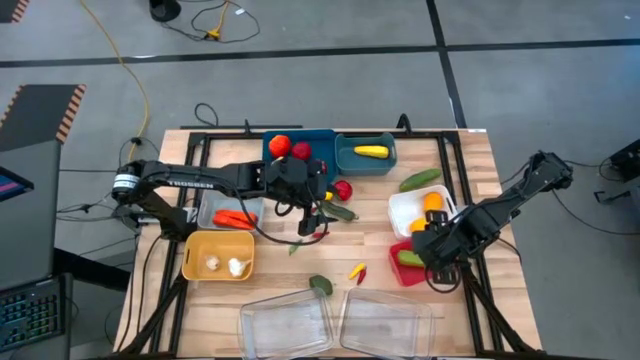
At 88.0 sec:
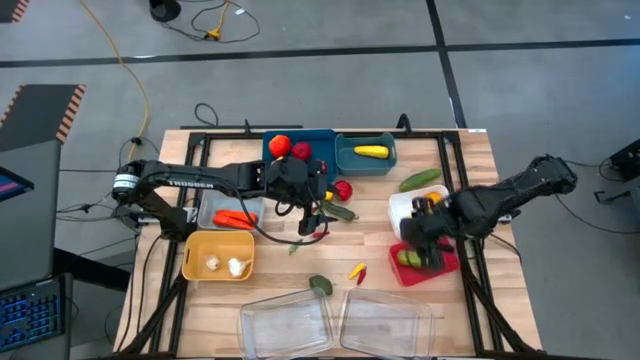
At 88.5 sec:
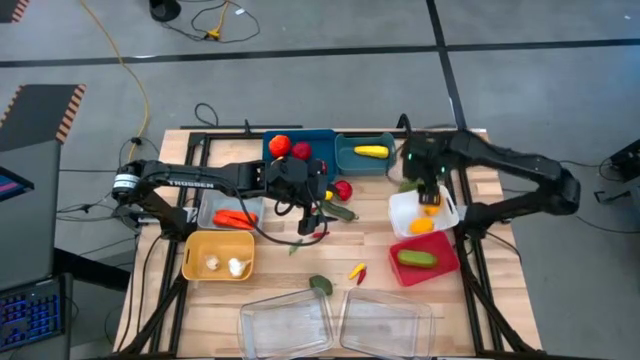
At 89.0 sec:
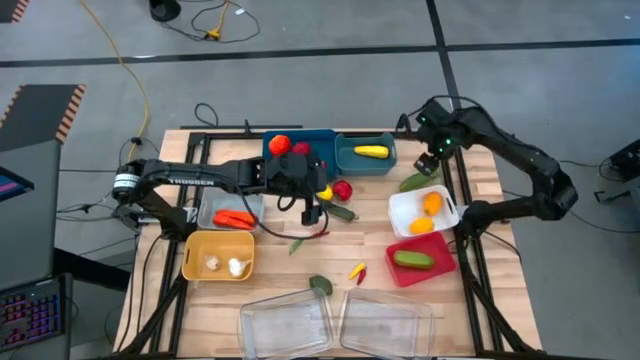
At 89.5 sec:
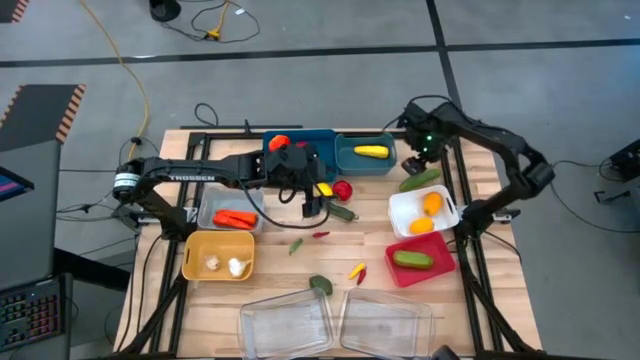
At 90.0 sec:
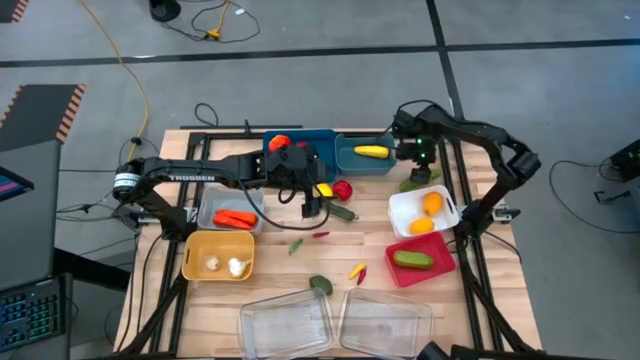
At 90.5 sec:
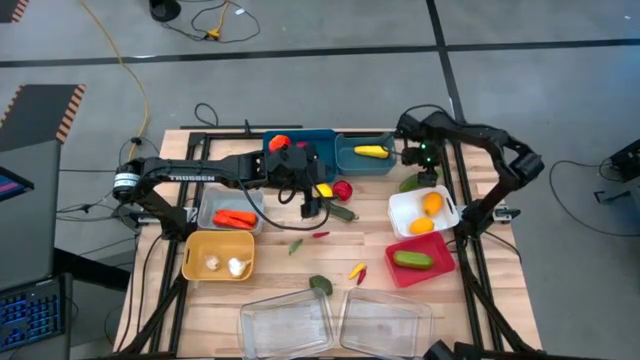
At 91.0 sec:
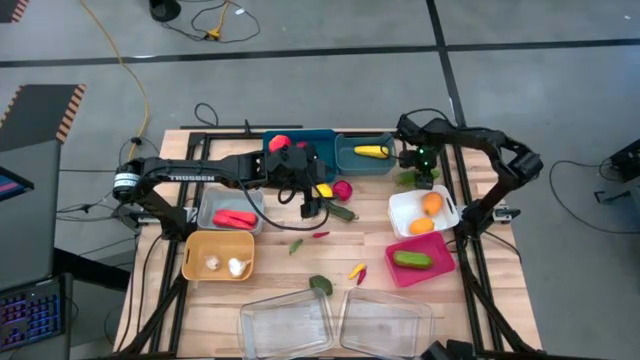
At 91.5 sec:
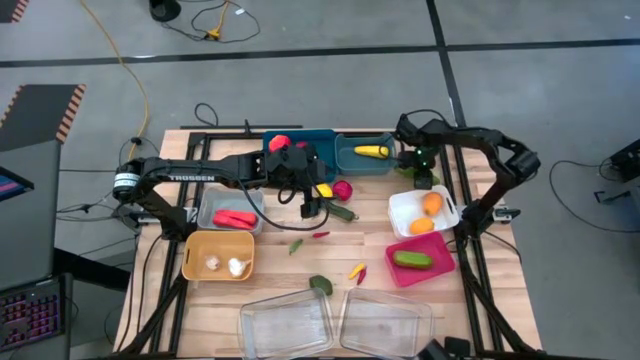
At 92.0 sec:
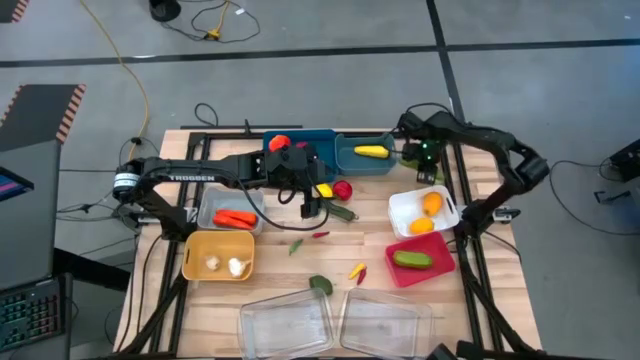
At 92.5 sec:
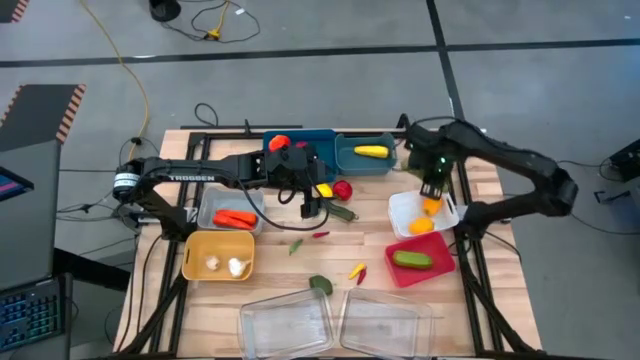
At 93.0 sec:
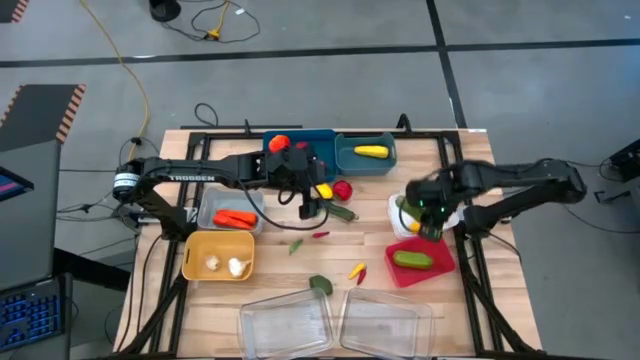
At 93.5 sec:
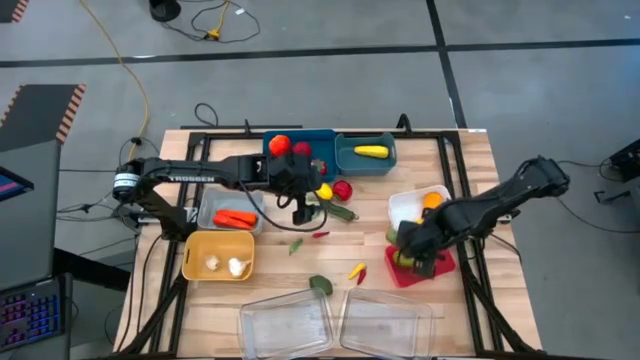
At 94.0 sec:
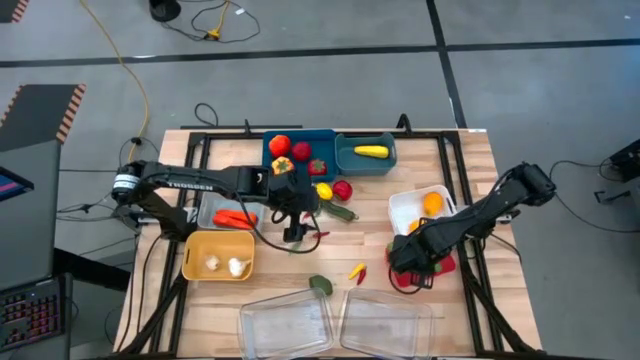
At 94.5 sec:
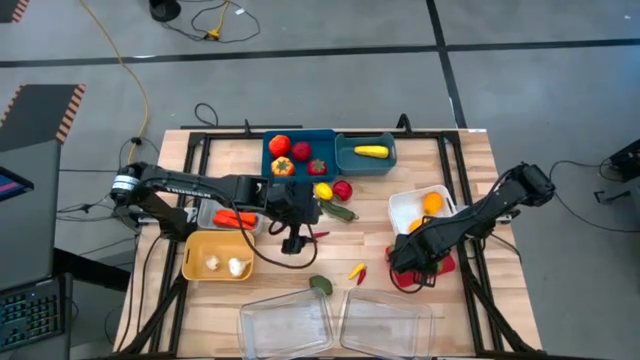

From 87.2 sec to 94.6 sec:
Task: Sort produce into baskets
Put the chayote into the pink bin

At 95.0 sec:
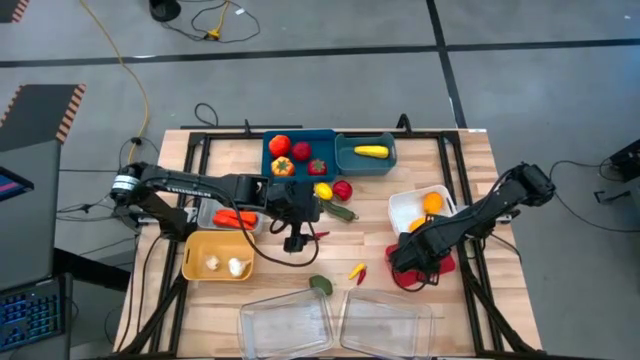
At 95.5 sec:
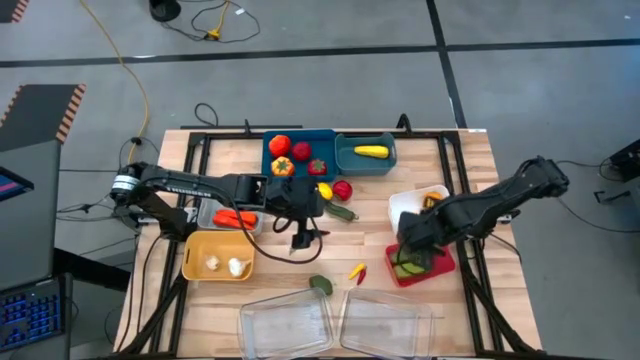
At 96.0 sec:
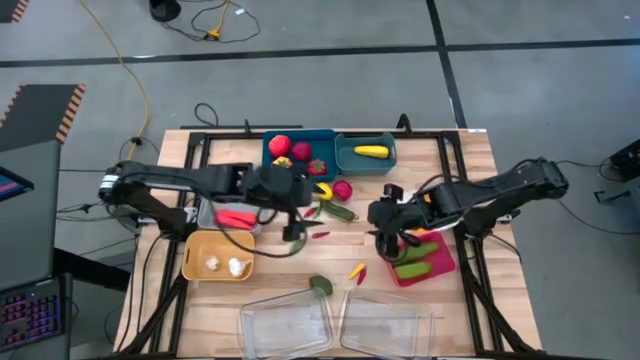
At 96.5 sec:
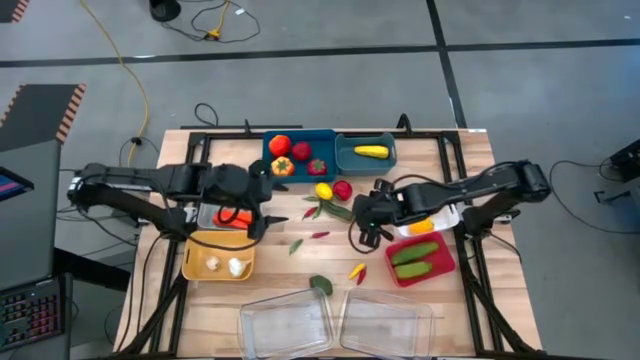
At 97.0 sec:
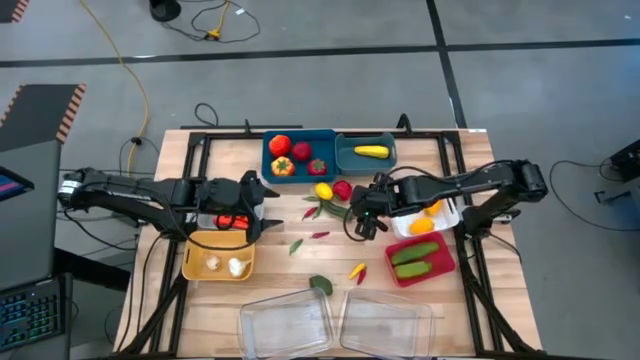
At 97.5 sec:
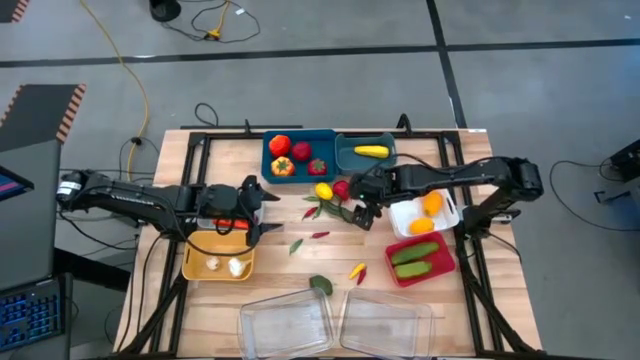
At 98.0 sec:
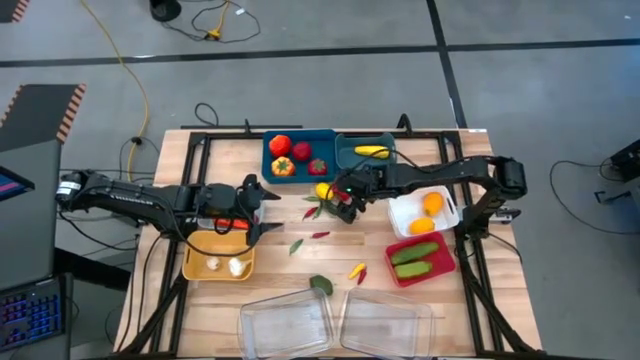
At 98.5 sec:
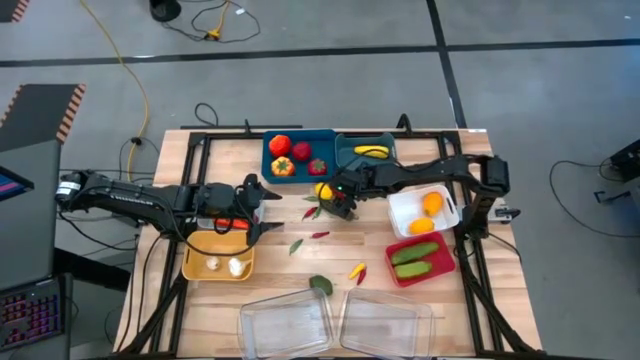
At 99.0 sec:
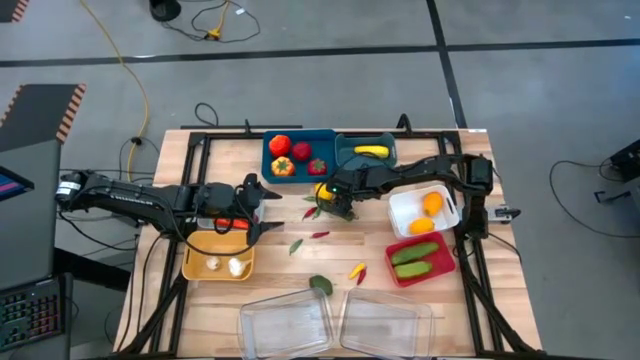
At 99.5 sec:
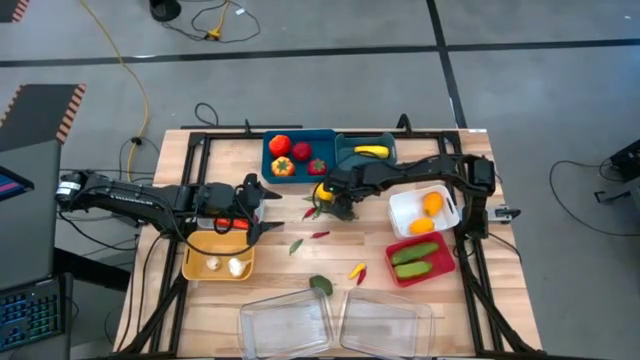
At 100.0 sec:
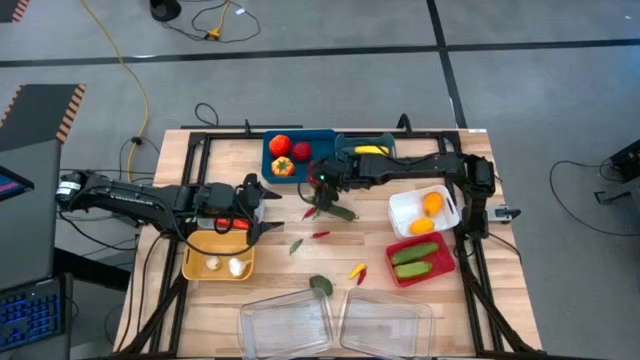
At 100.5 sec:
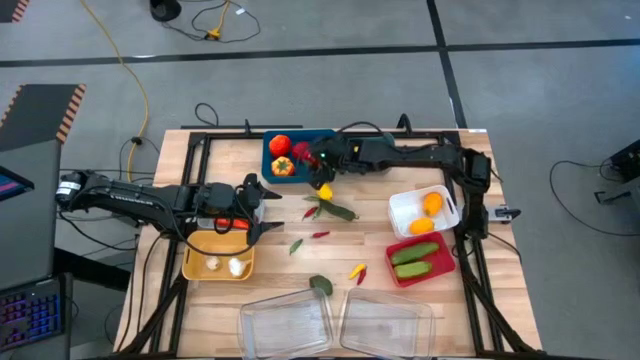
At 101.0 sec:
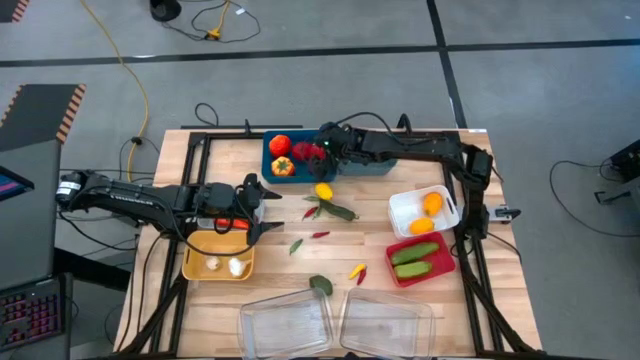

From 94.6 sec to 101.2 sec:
Put the tomato into the blue bin

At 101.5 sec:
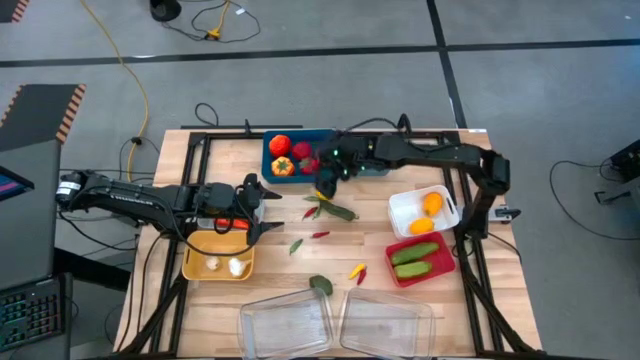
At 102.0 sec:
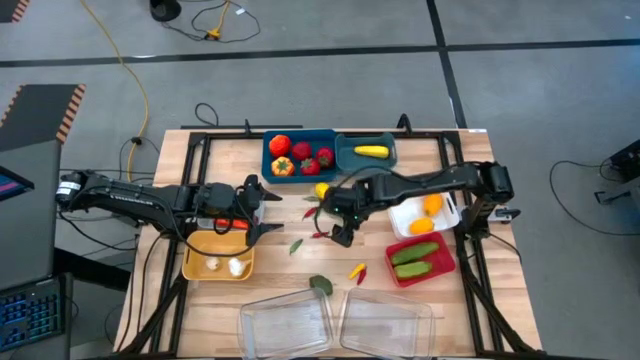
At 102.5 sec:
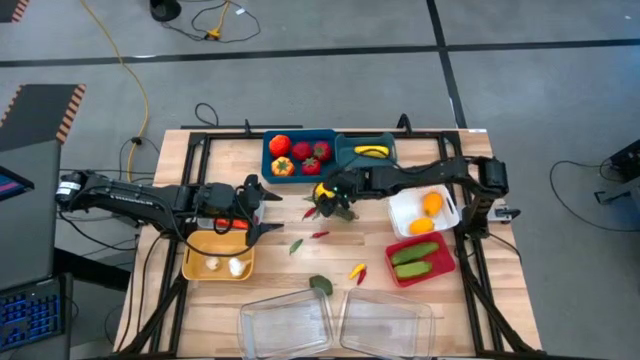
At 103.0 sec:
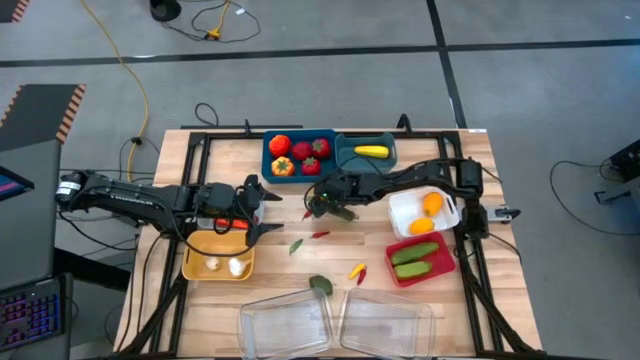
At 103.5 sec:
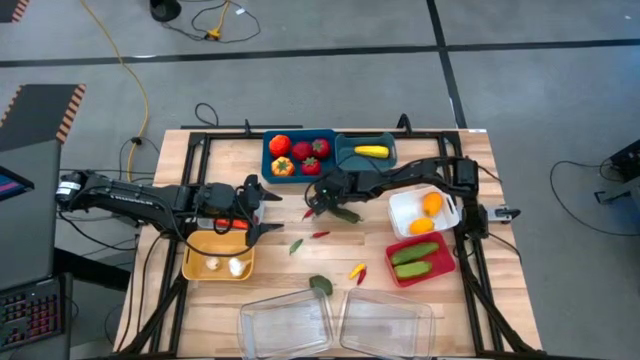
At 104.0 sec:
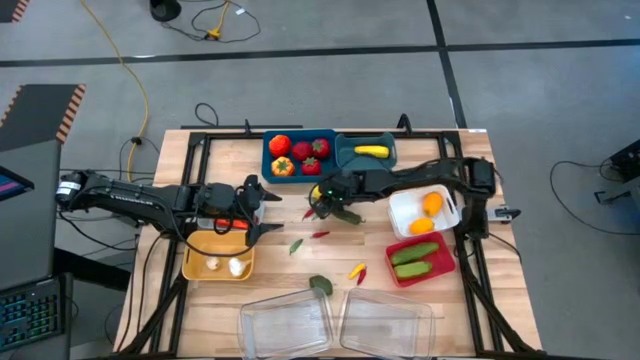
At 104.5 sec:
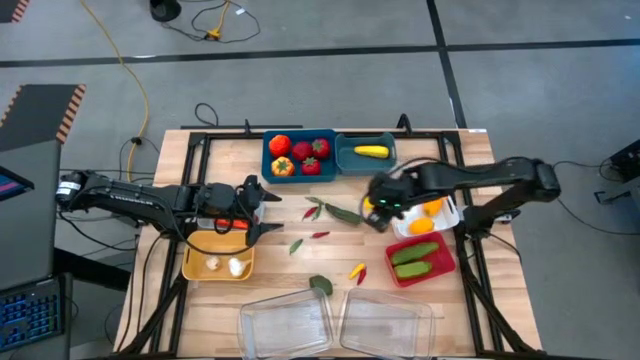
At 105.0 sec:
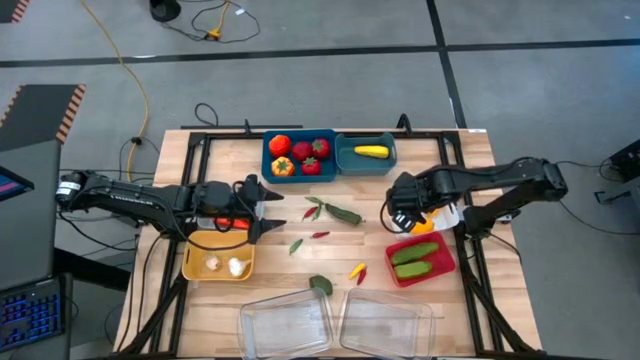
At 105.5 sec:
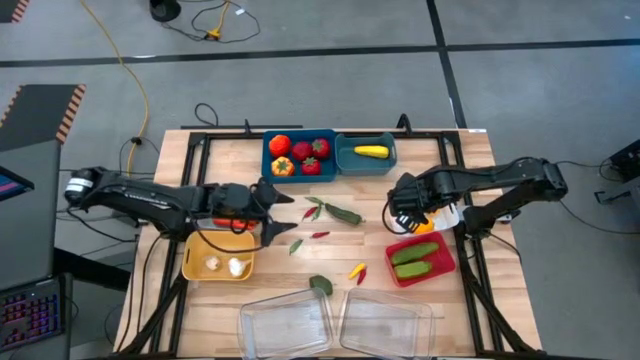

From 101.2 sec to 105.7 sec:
Put the lemon into the white bin

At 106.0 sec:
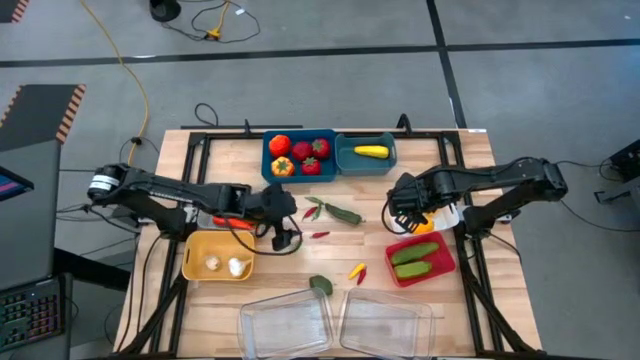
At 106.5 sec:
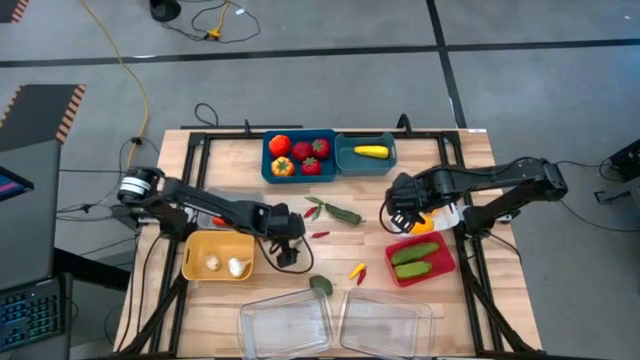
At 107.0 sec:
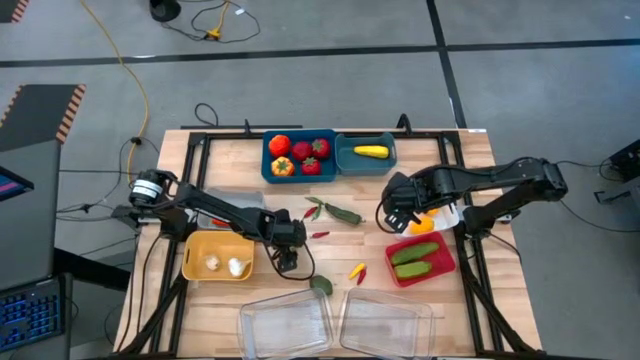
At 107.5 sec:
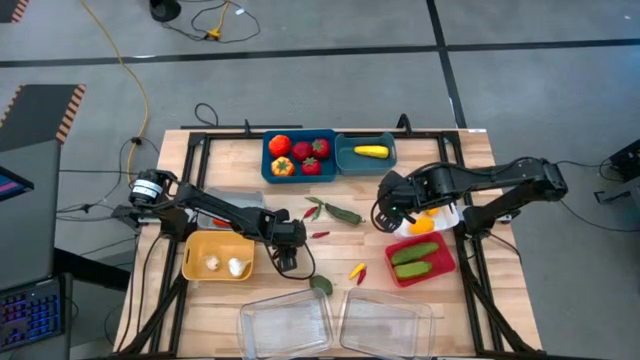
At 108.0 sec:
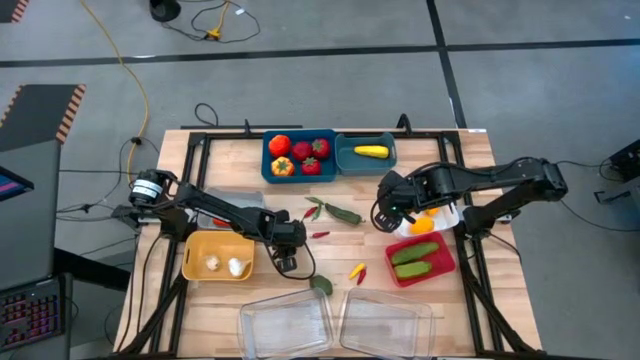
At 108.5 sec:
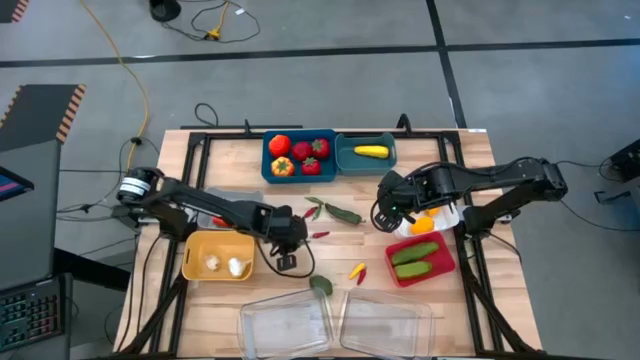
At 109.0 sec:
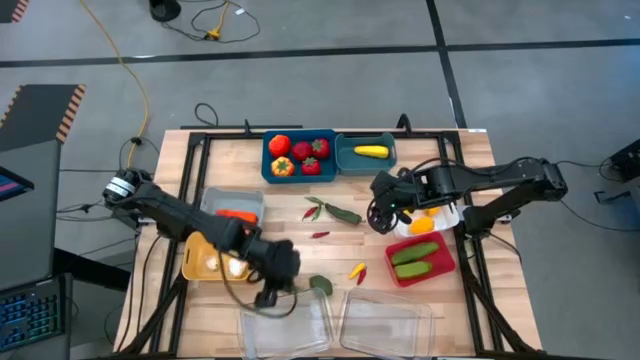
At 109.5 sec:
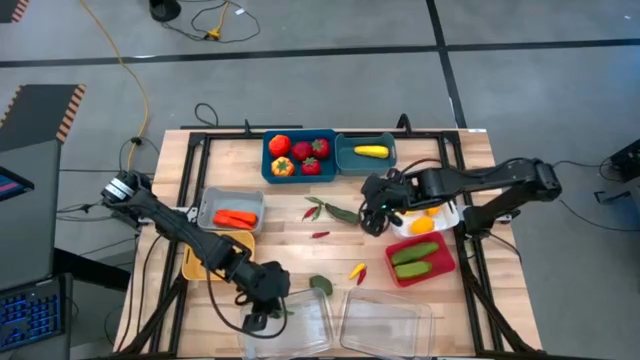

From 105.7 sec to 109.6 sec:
Put the green chili pepper into the left transparent bin
